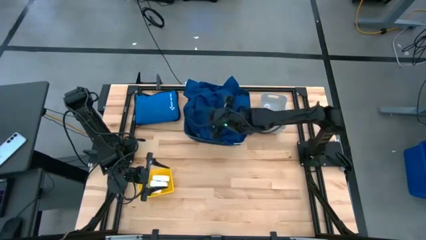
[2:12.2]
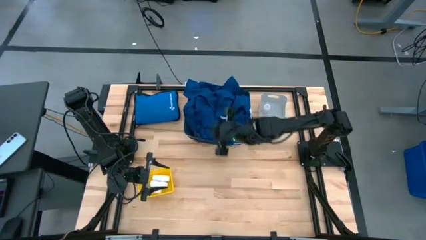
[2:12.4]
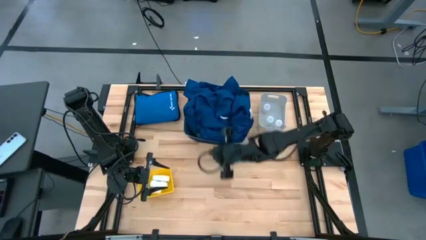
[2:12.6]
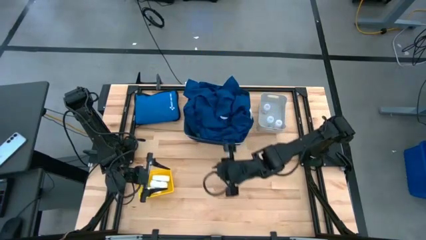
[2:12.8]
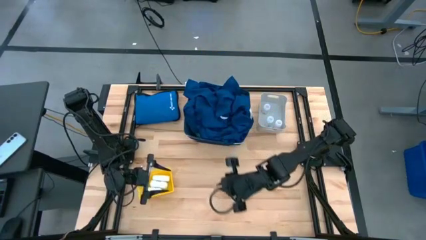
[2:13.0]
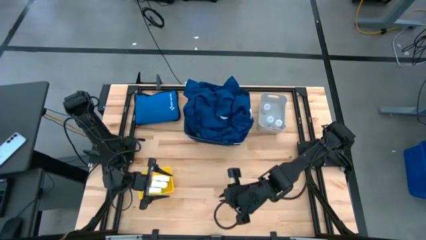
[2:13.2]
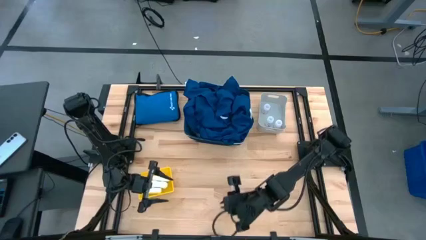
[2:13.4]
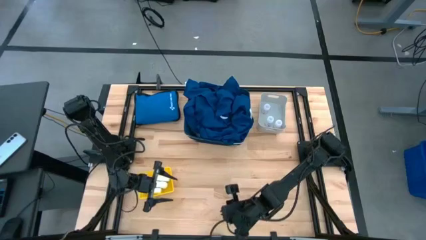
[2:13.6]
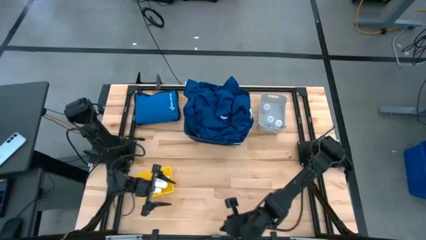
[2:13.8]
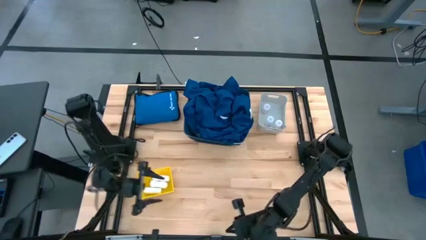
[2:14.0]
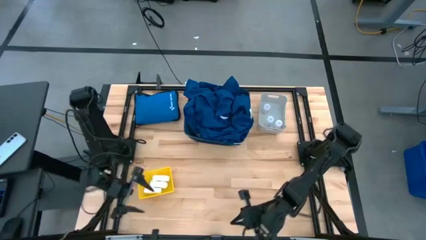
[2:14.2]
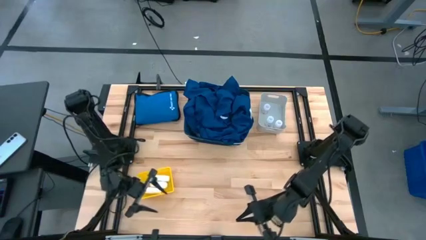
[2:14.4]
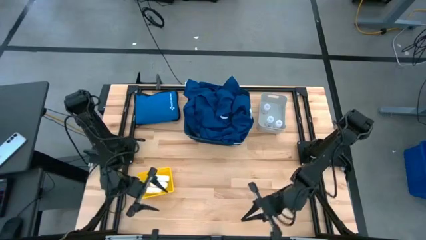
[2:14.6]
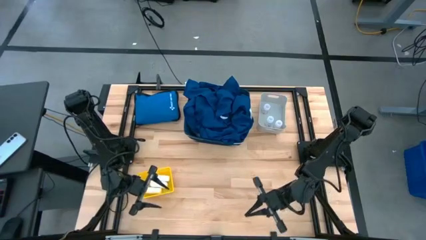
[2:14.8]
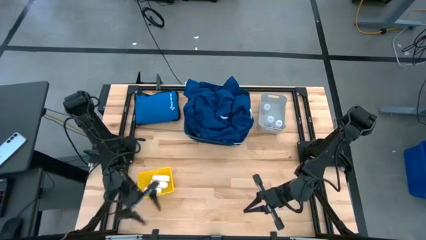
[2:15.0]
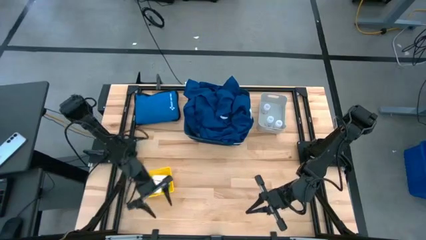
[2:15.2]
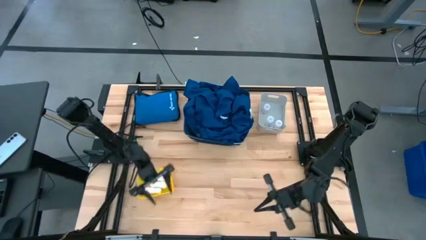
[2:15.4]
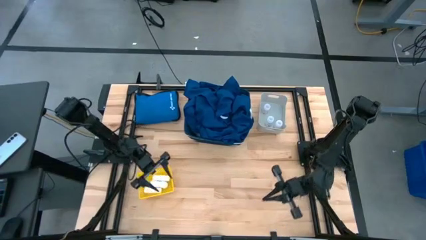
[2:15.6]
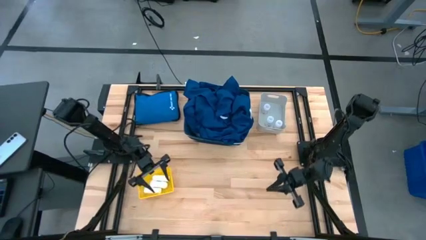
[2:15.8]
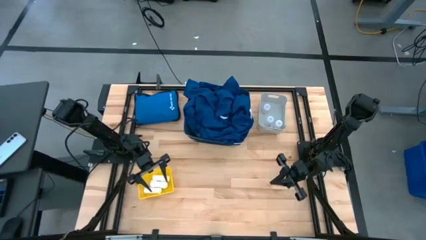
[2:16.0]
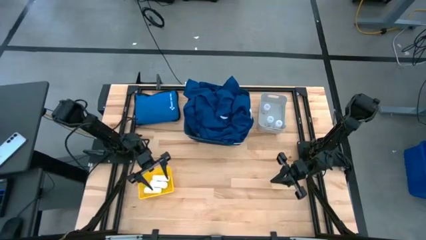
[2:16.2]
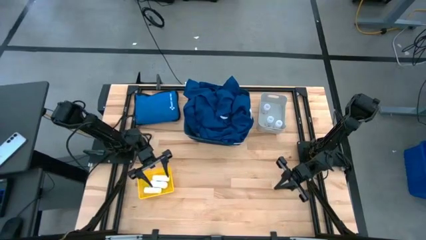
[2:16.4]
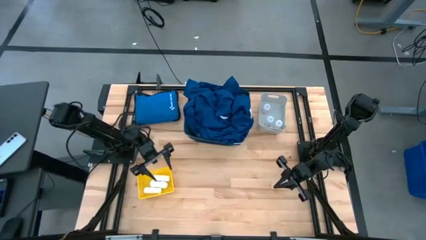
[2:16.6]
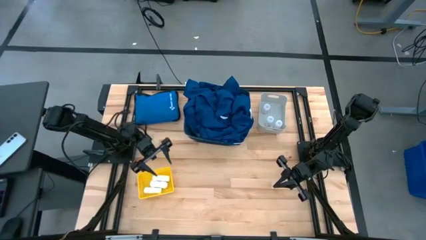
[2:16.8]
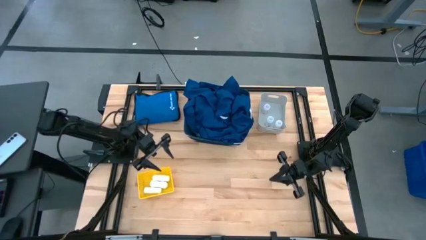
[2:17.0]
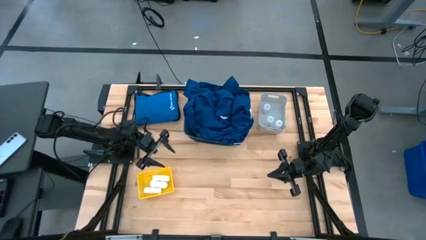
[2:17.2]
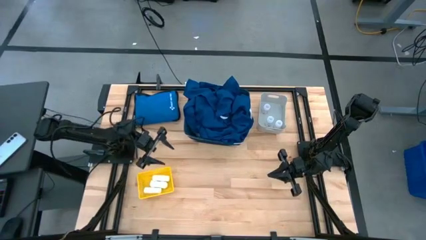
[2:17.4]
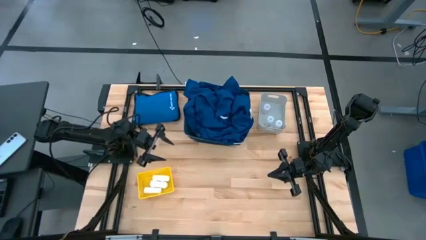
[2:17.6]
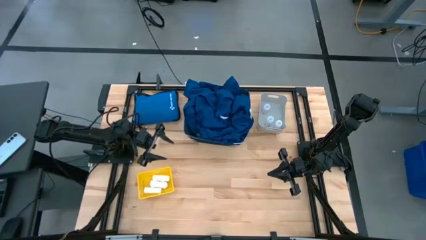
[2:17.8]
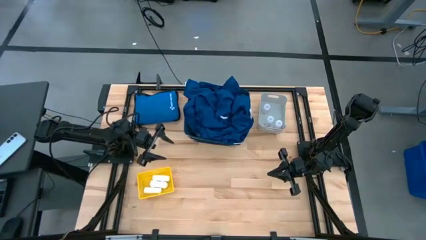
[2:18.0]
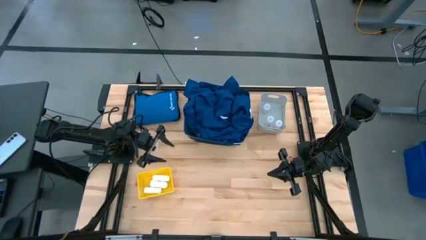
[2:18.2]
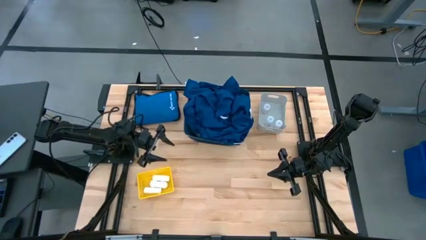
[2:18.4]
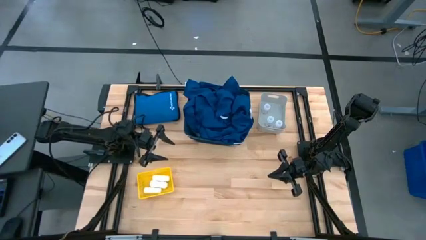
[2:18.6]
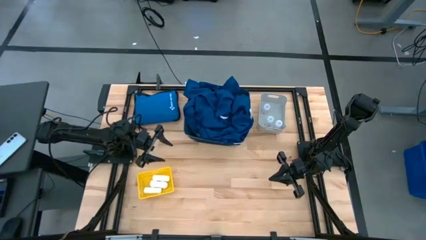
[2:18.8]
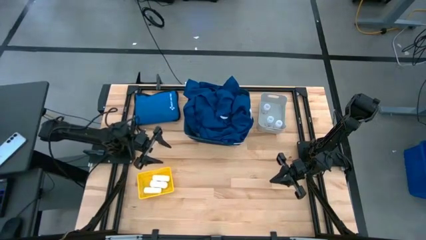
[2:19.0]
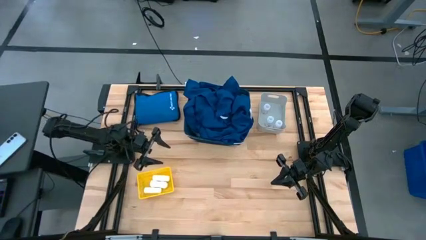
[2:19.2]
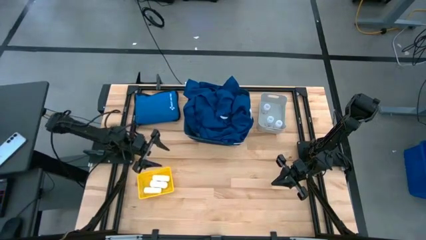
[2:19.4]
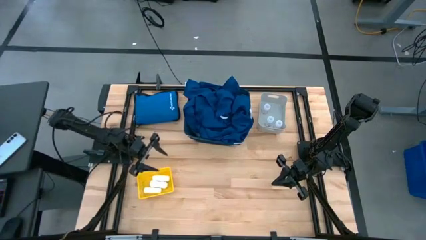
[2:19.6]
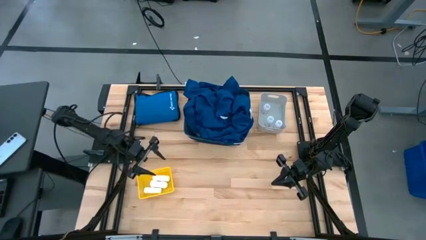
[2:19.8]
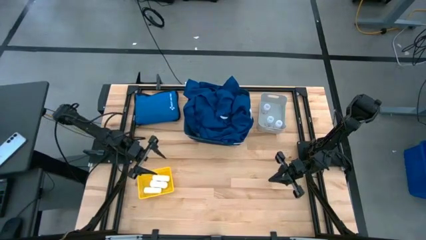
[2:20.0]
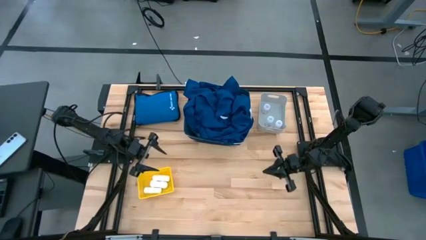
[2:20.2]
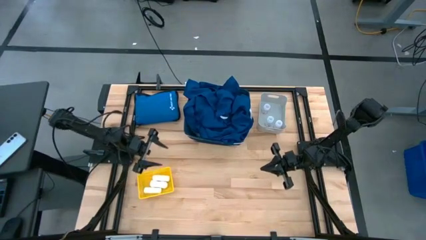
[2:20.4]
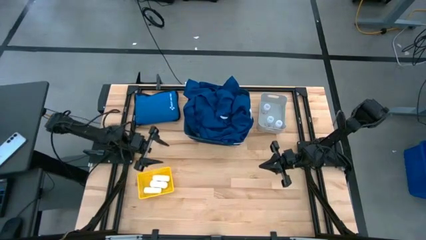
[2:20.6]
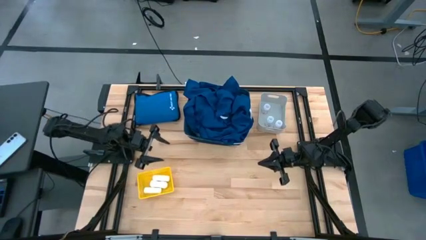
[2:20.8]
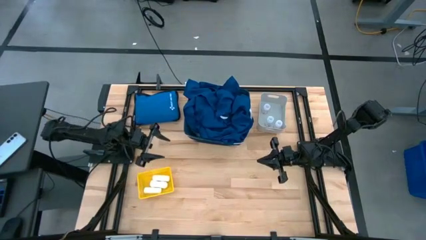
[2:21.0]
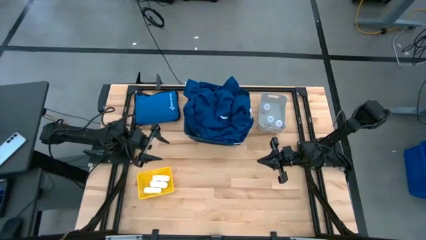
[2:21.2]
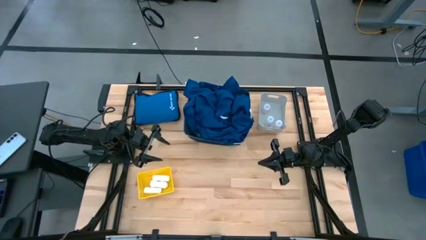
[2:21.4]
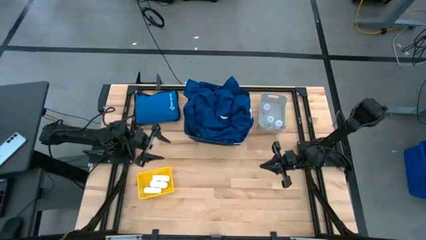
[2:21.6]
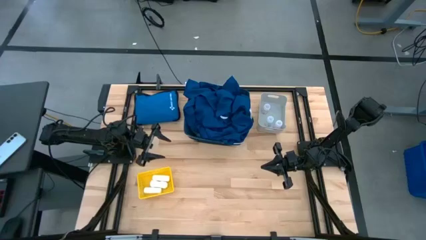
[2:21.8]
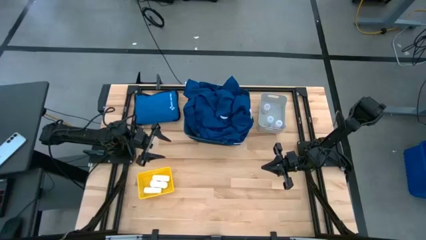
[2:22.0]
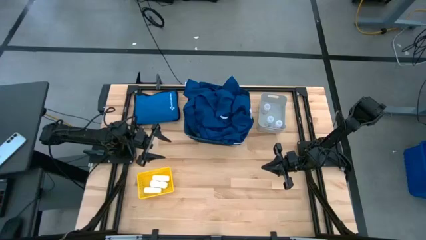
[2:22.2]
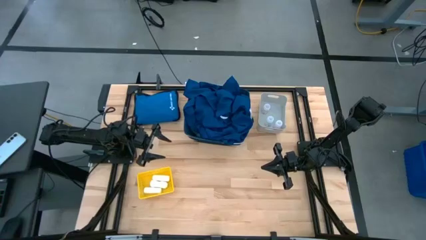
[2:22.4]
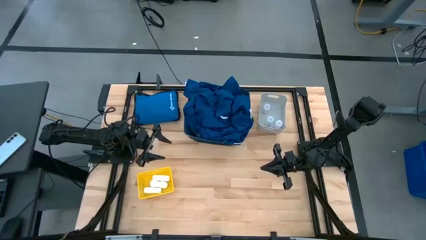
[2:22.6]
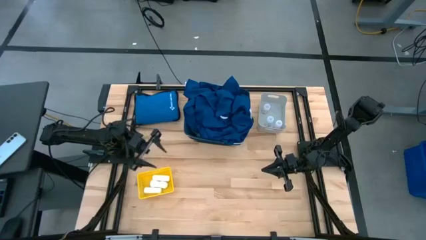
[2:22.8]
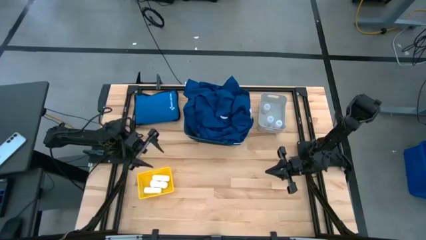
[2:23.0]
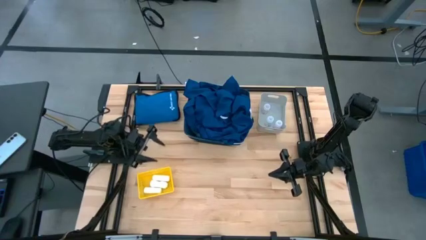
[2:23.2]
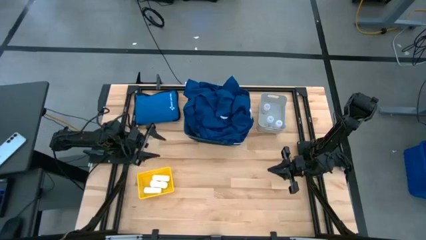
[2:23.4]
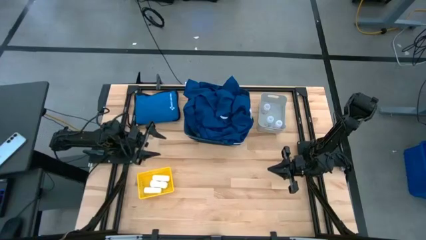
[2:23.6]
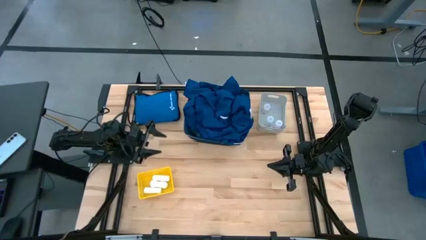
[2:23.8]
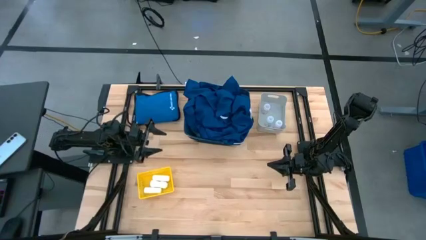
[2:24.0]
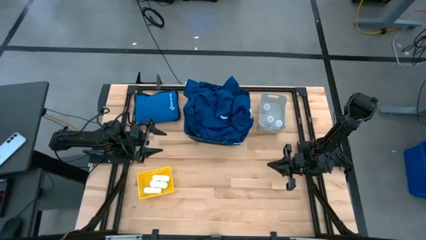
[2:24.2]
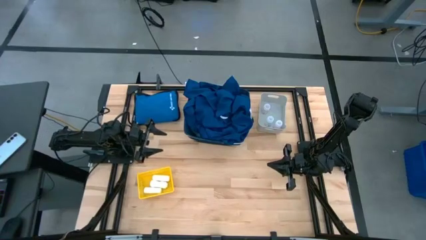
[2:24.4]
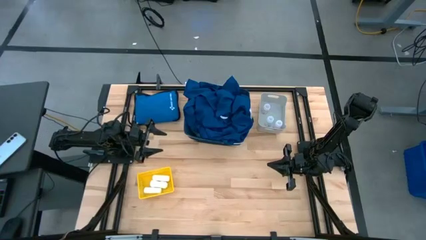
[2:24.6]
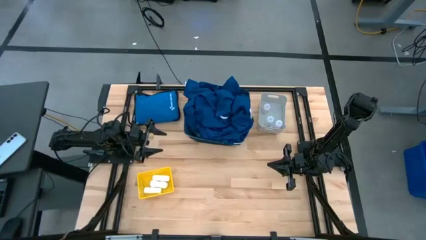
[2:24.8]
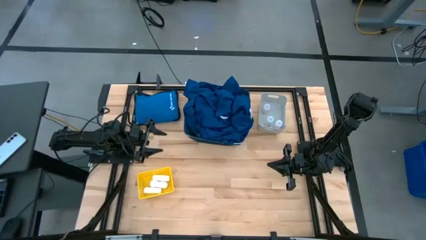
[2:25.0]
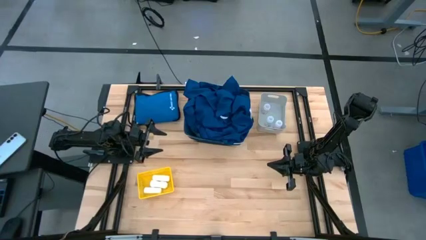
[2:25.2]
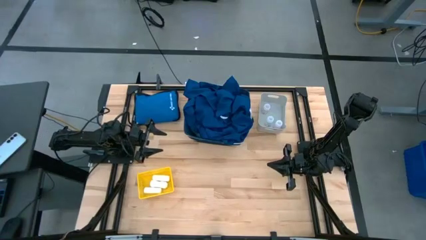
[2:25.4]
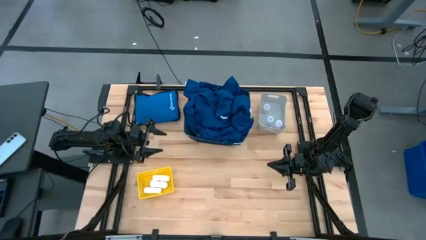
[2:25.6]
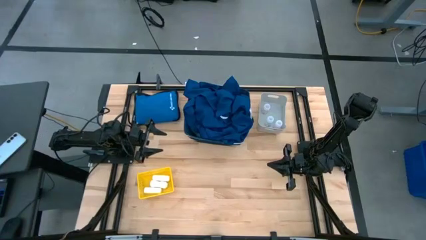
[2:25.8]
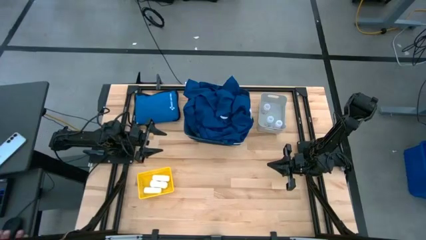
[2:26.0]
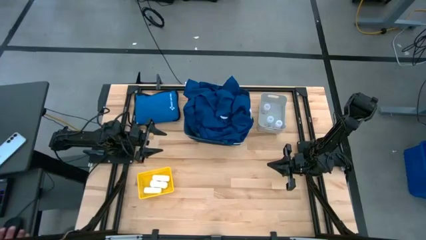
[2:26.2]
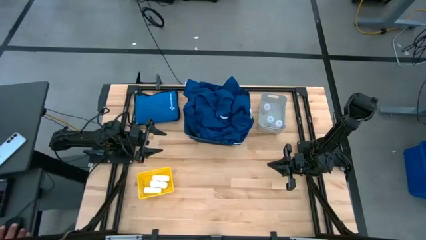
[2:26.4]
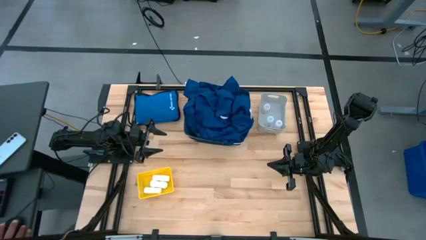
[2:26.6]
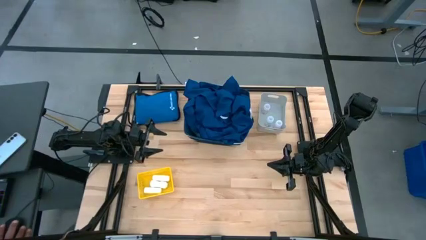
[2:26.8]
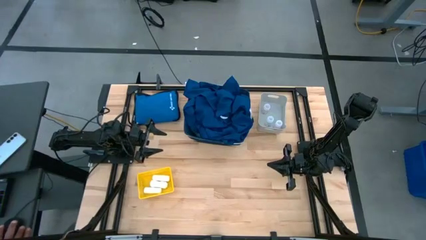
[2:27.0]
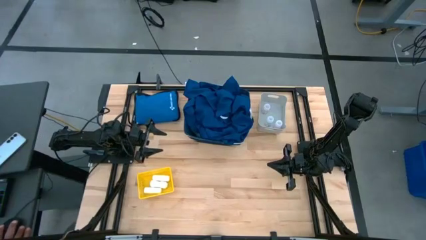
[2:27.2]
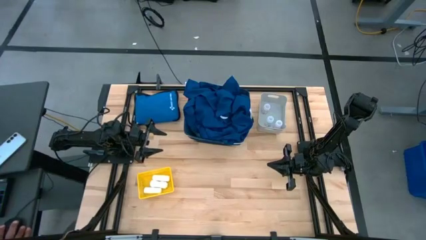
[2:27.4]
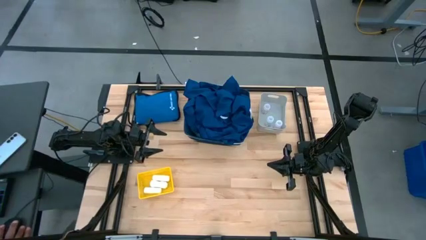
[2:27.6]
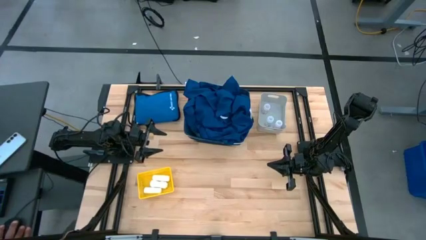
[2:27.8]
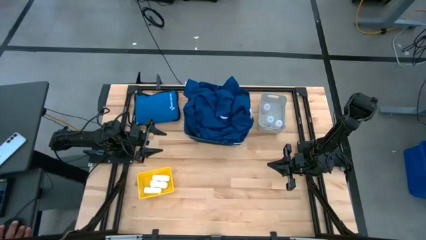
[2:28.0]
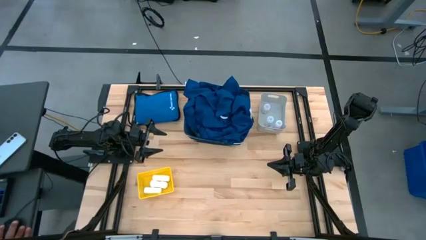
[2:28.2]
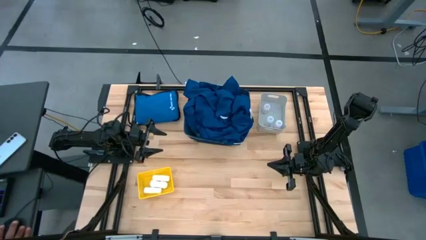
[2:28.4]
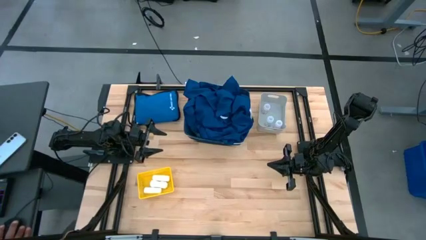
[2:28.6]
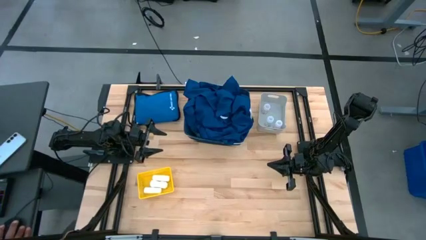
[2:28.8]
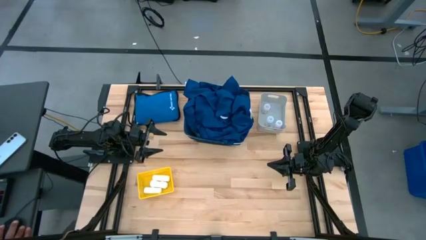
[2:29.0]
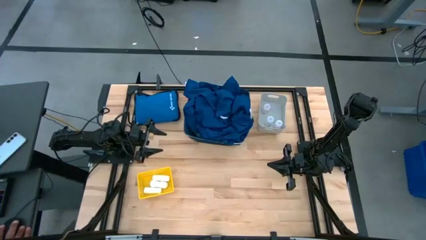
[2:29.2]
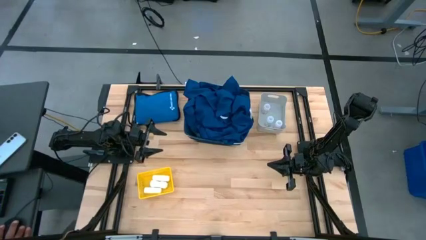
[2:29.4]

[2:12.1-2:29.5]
Task: Pick & Place Medicine items
Return to Home Position
